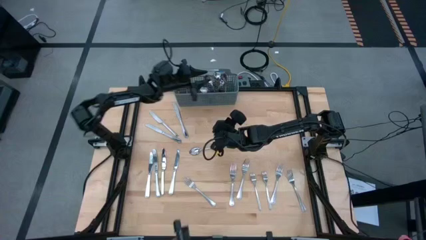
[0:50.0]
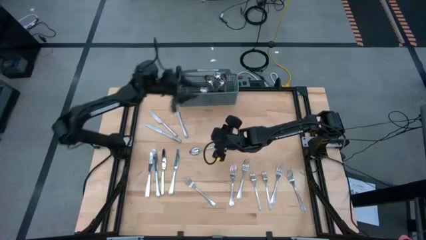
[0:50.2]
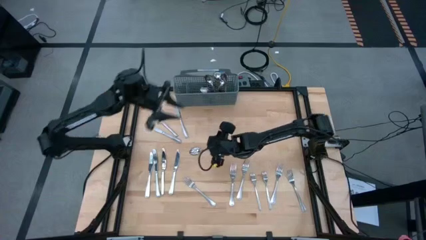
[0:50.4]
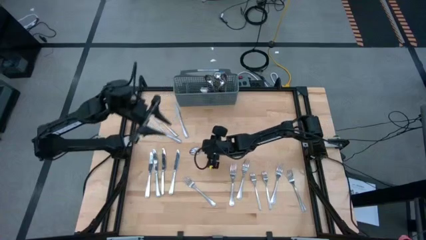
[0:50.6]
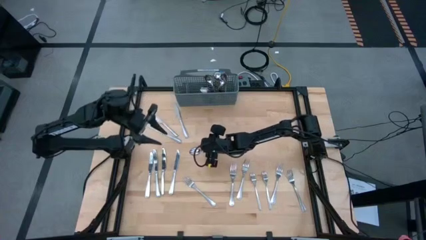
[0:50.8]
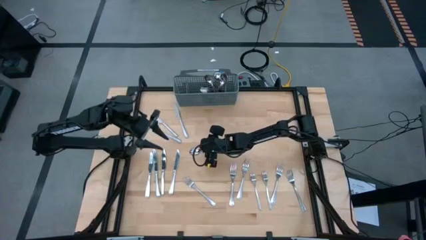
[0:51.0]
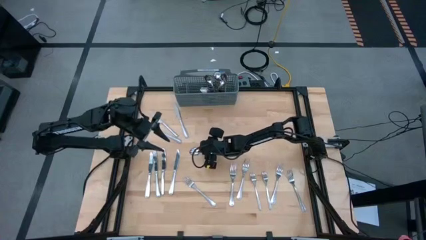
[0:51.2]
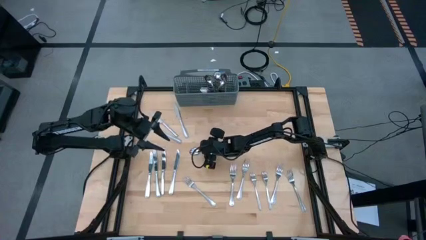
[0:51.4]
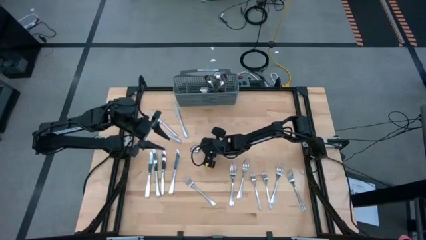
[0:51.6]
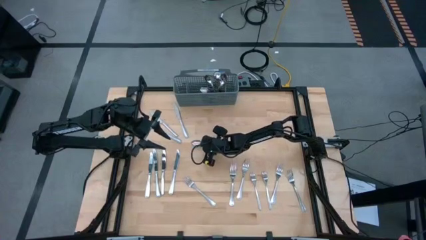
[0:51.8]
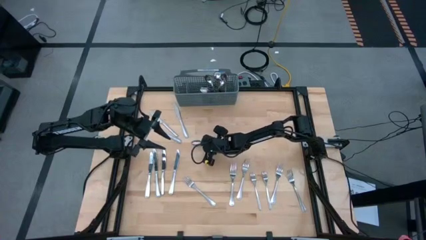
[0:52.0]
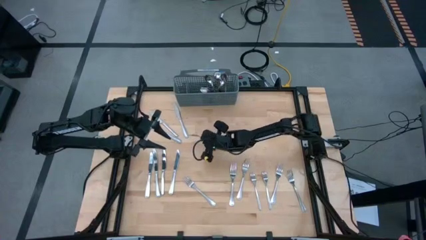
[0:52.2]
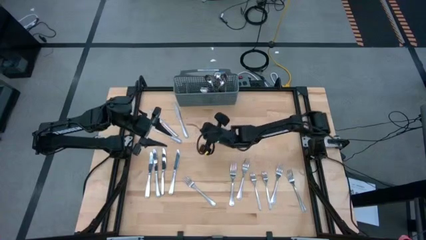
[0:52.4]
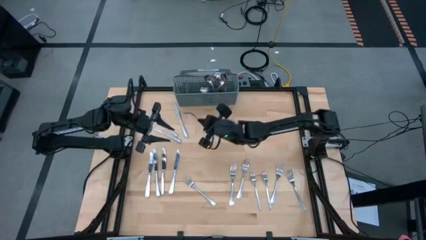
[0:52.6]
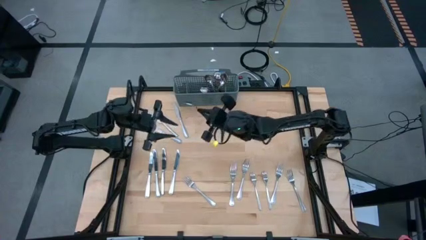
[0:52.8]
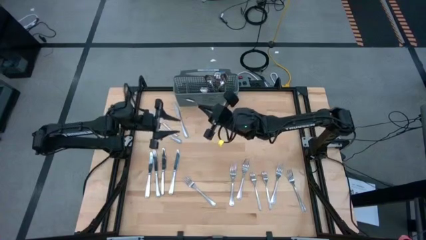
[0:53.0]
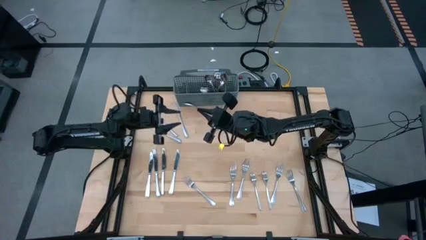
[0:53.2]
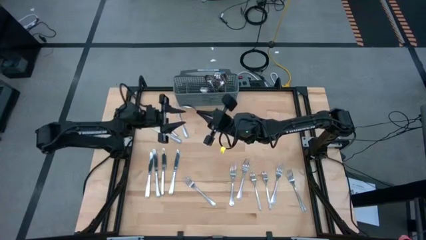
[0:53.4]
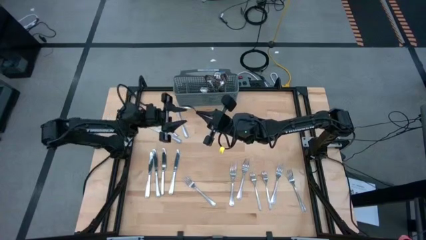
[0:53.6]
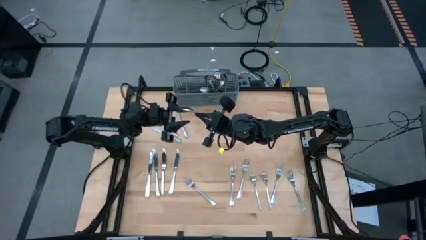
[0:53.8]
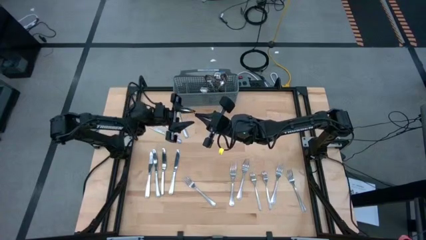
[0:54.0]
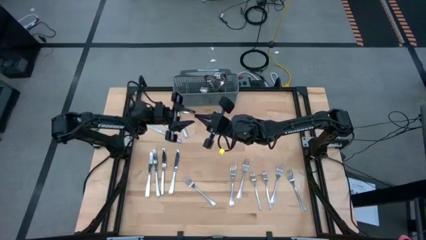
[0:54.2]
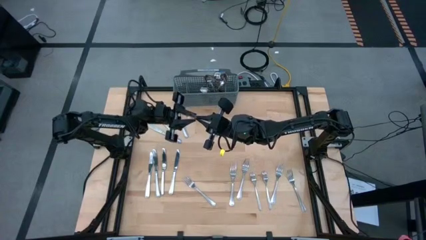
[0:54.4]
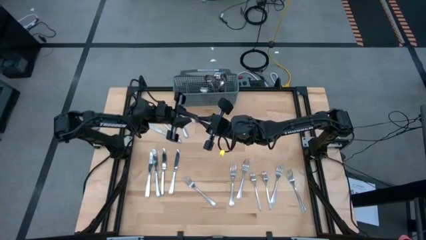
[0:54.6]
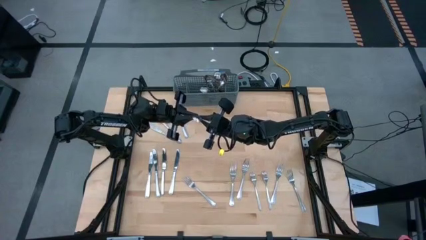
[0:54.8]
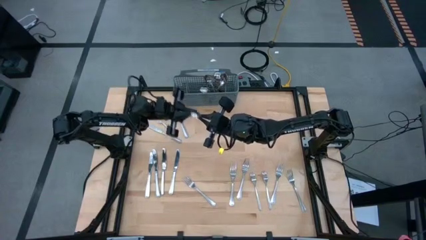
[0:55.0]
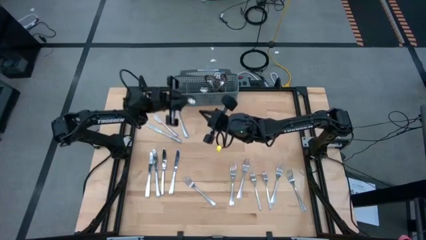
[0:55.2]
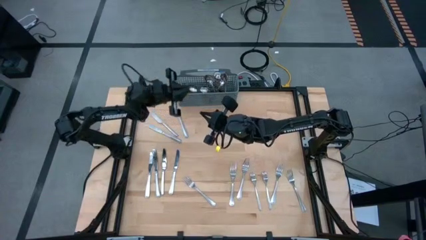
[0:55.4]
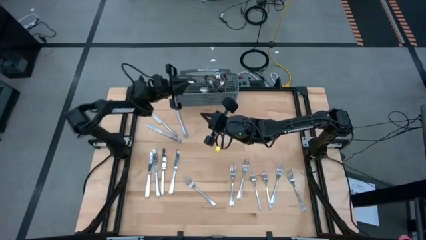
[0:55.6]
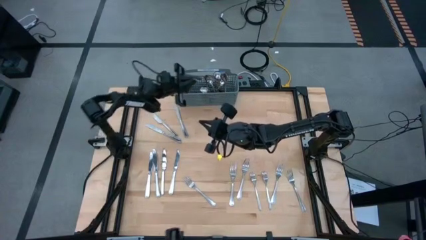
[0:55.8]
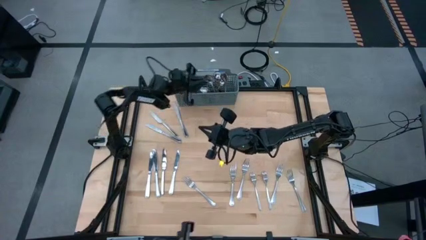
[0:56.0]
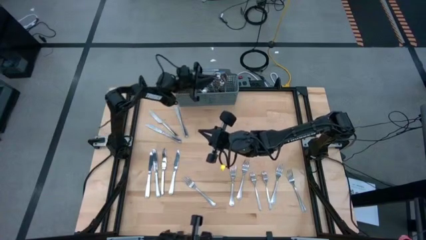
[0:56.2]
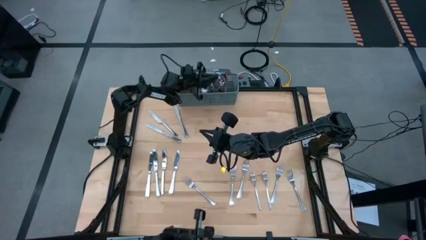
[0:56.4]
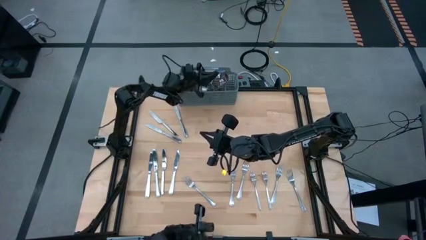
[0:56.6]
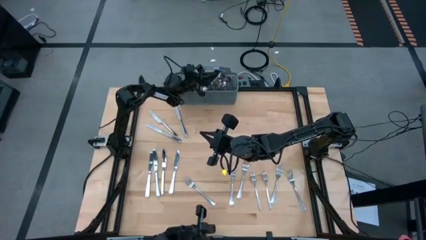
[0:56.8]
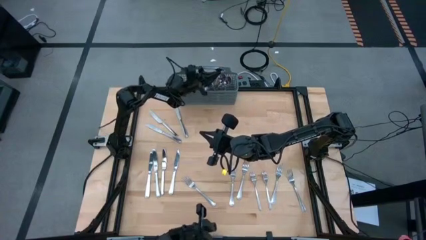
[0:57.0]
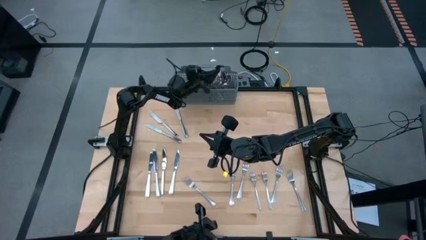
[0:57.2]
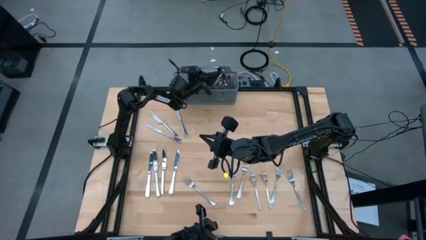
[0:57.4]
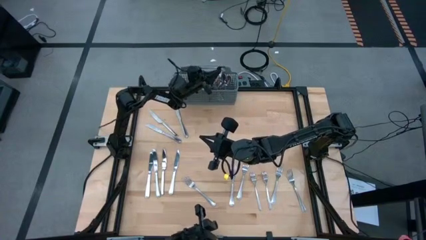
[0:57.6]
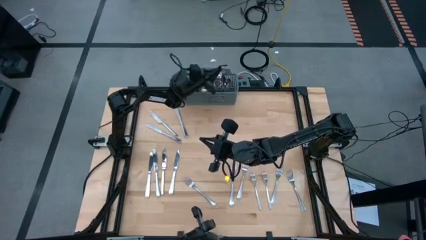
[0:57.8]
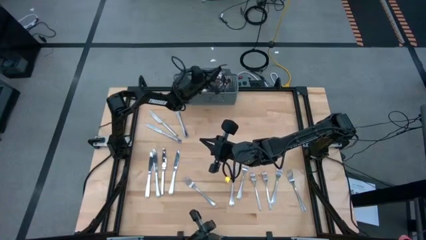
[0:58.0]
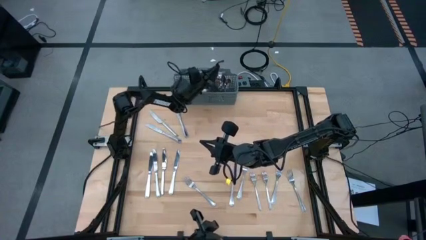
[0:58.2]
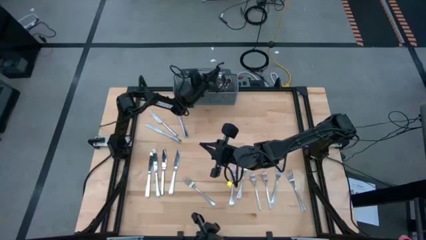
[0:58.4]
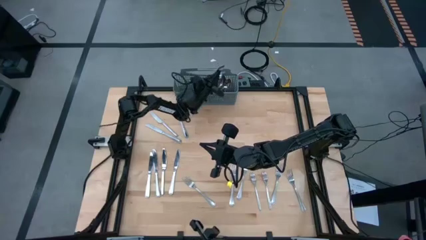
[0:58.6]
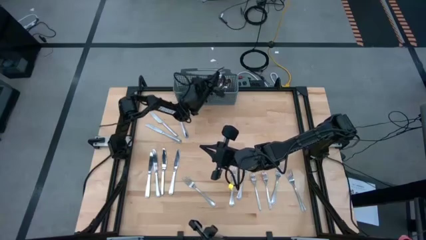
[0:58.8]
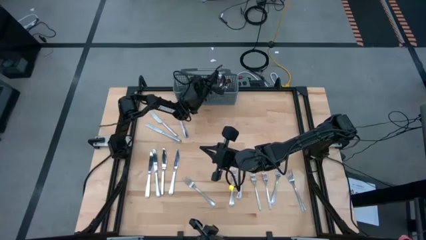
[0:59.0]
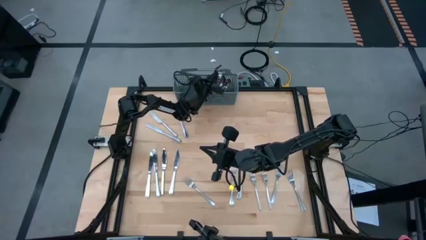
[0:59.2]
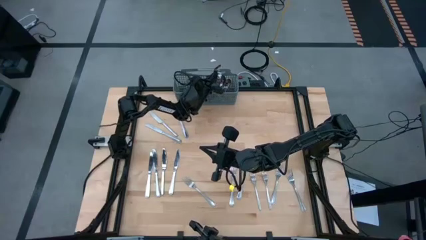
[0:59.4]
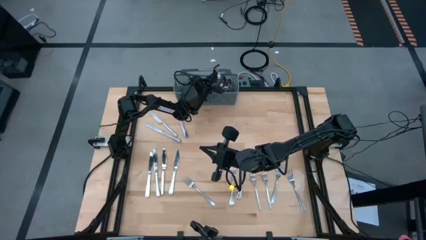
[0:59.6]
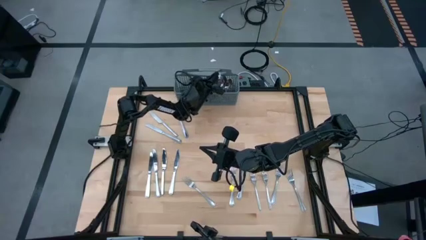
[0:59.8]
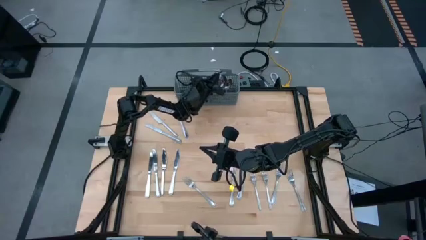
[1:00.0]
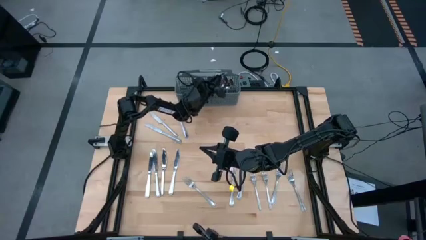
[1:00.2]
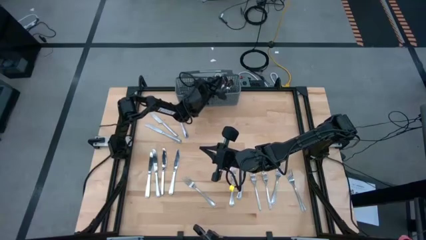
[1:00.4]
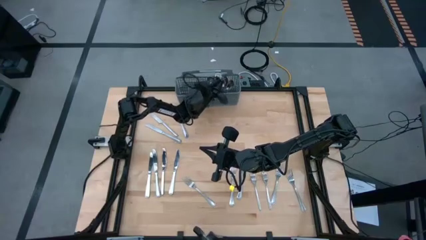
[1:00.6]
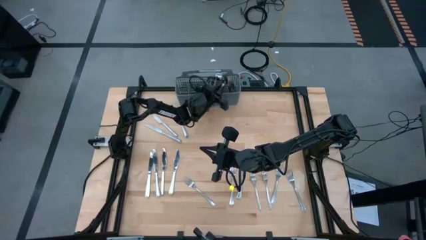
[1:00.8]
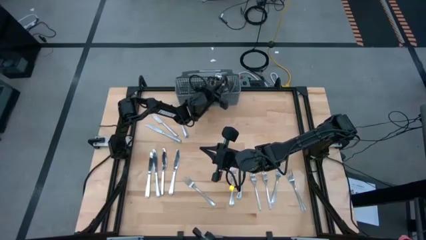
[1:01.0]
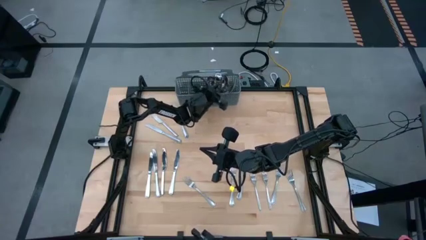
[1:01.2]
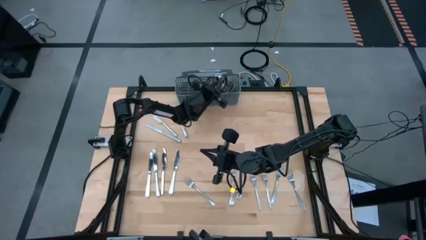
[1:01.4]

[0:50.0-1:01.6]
Task: Sort silverware
Put the silver spoon into the gray utensil holder
